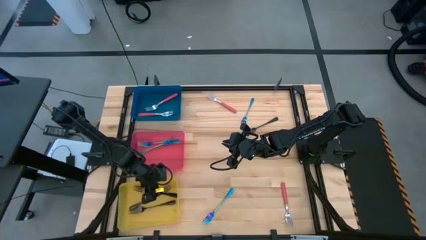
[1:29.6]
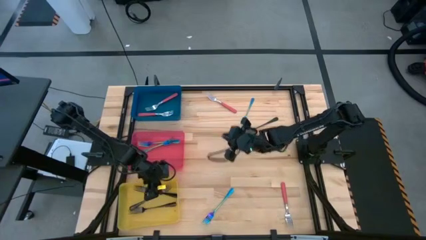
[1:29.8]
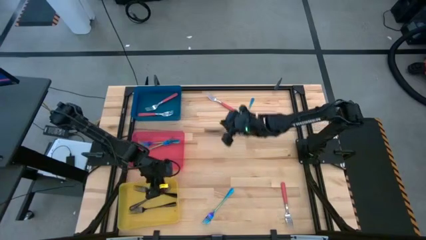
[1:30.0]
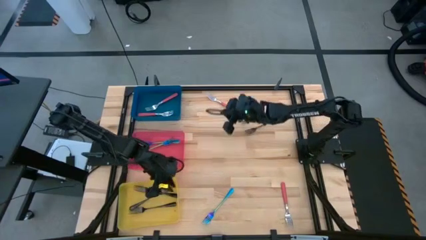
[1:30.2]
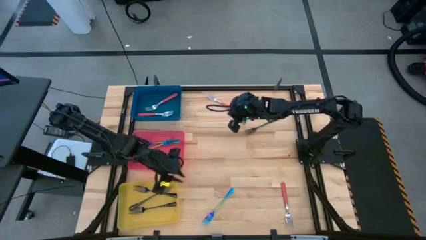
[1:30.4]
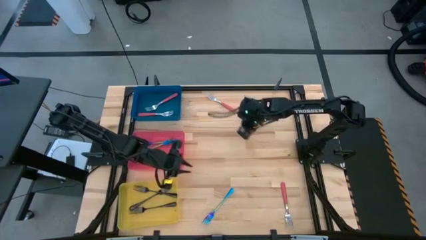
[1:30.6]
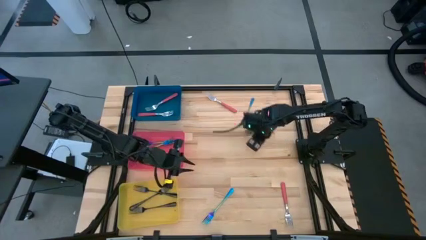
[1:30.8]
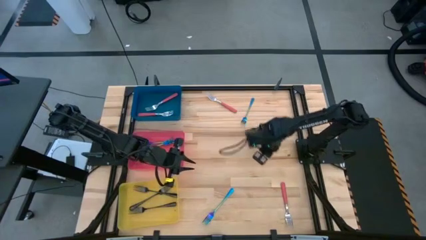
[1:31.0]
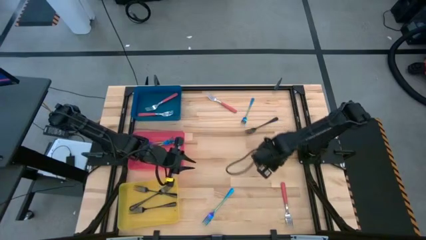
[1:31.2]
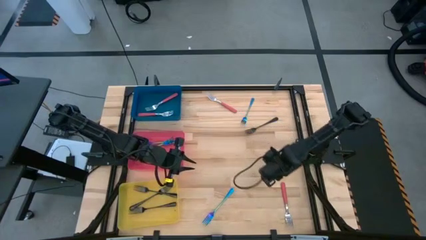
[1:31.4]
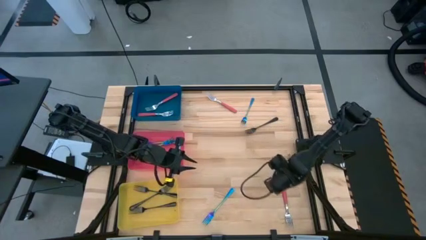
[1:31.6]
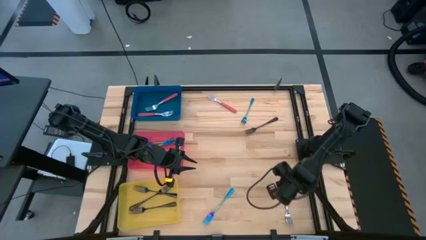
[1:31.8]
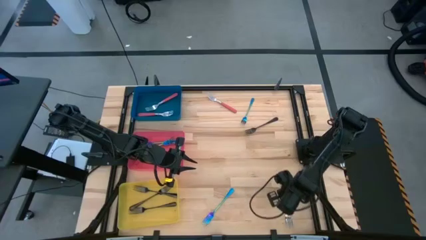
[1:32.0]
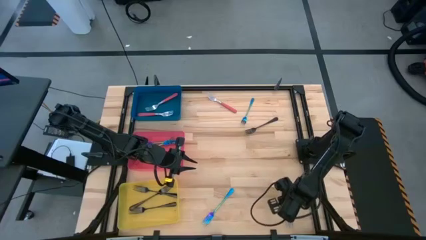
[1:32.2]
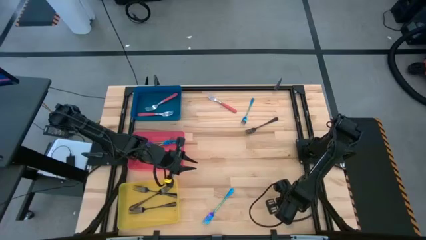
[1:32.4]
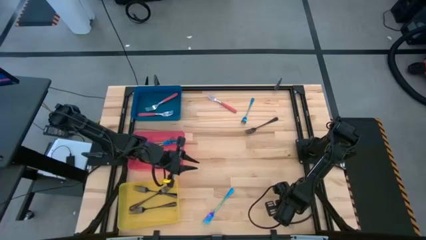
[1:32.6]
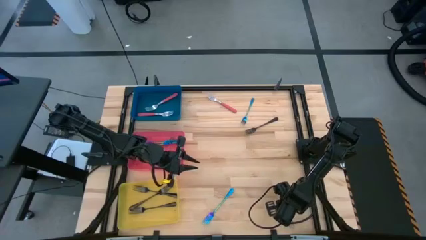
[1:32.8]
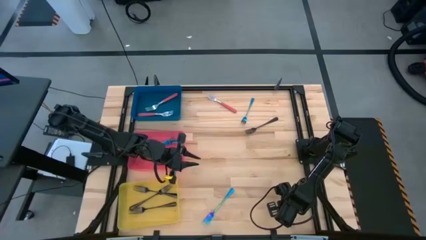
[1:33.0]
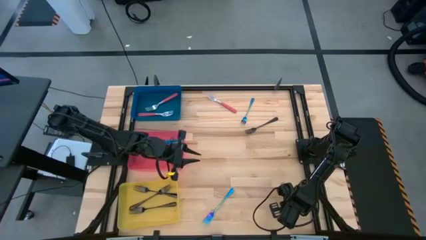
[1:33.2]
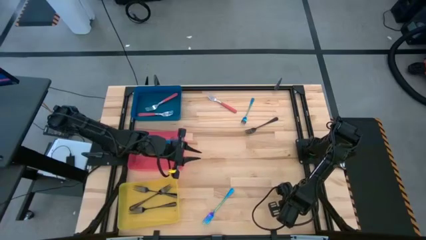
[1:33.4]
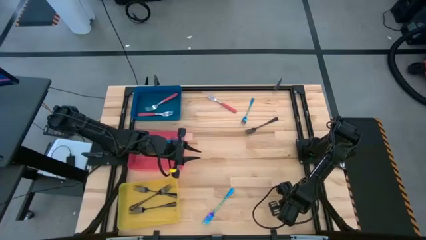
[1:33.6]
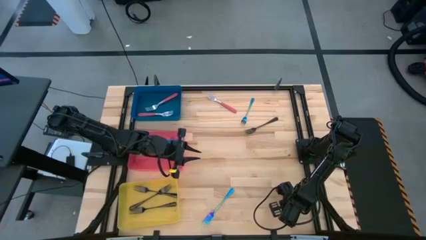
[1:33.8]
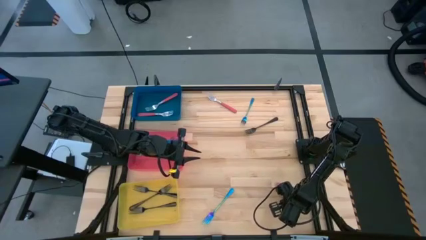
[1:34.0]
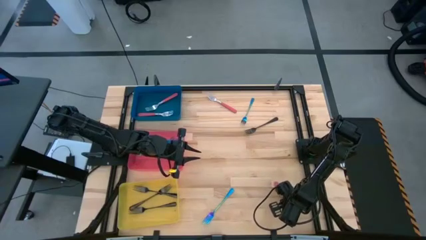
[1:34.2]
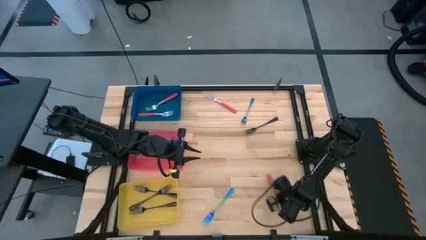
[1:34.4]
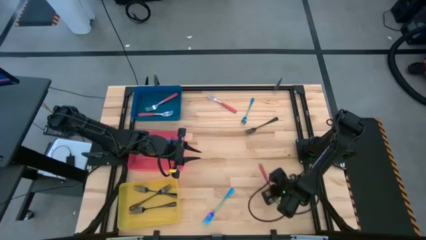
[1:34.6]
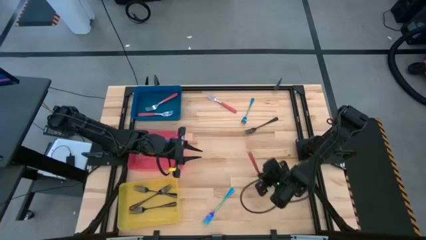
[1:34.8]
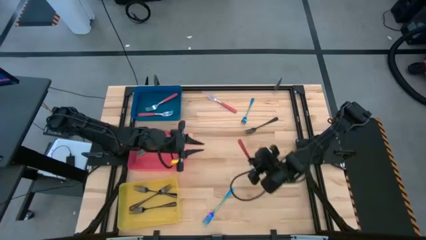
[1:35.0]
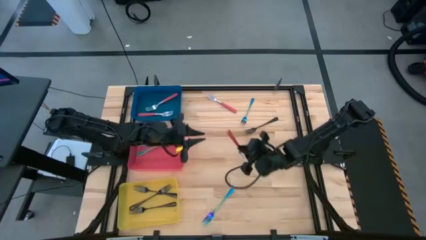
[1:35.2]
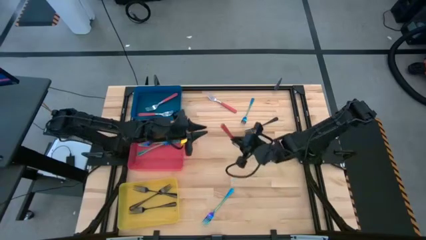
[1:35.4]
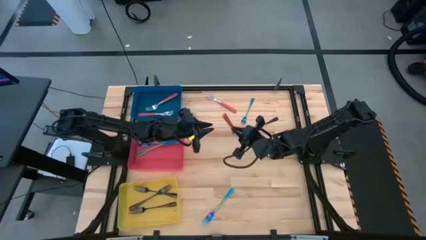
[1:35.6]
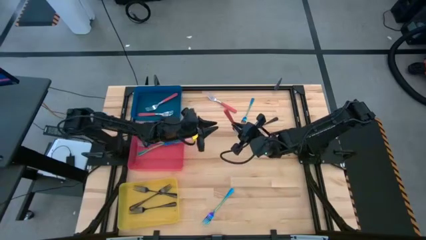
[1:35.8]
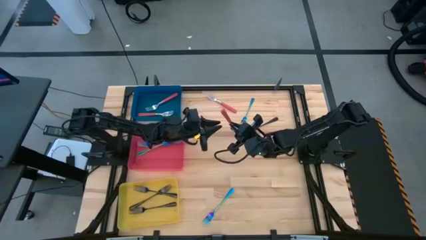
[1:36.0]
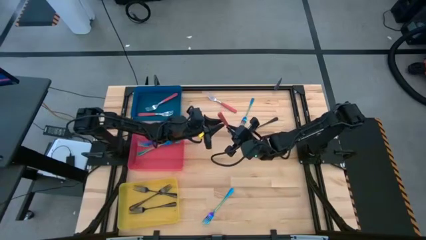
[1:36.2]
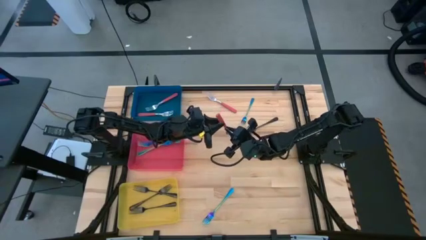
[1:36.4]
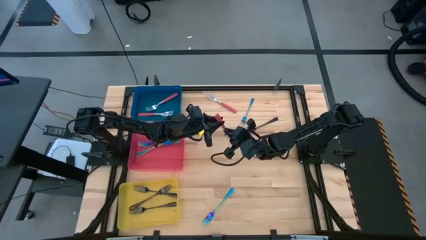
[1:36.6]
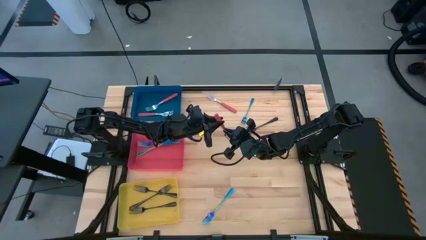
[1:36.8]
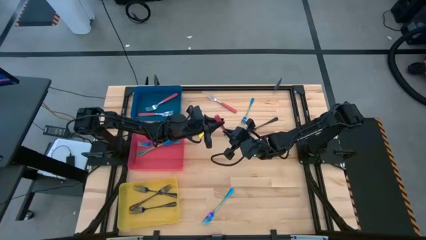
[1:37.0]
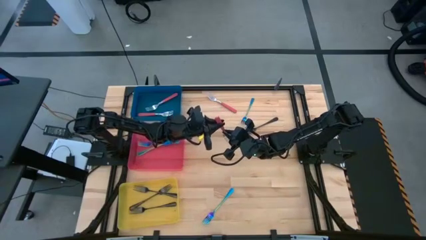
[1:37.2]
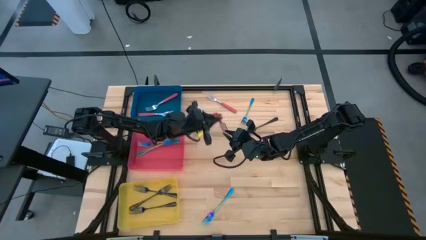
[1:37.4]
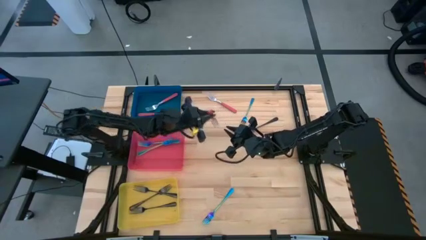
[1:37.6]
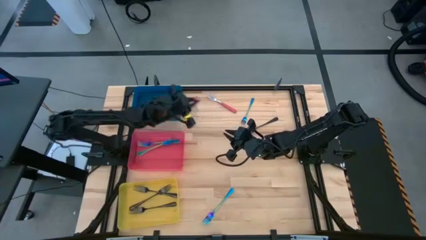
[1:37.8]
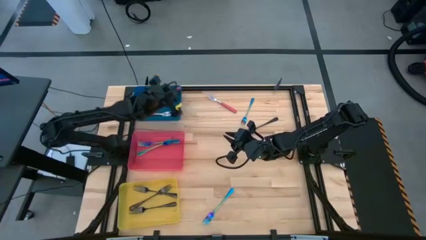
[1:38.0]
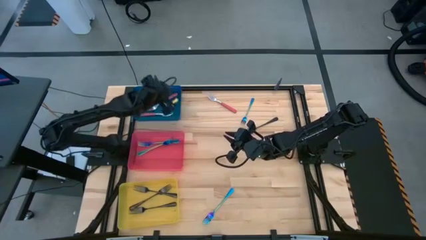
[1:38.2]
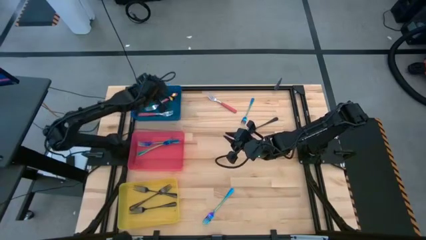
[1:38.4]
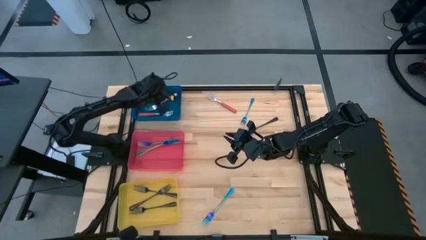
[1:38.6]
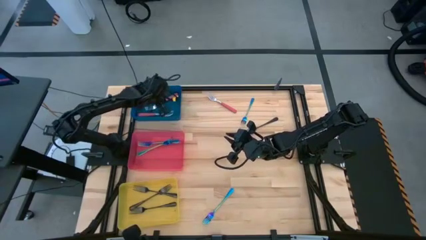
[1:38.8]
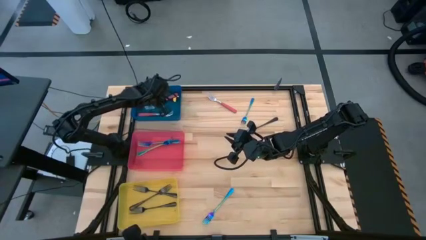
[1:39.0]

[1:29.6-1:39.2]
Task: Sort silverware by color (type)
Put the pink fork into the blue bin

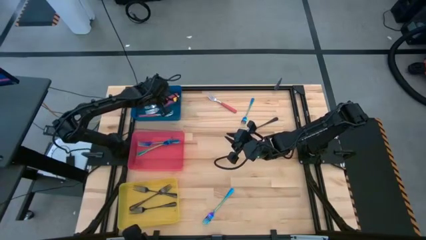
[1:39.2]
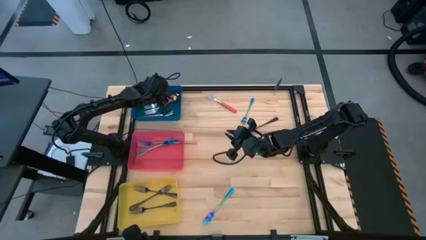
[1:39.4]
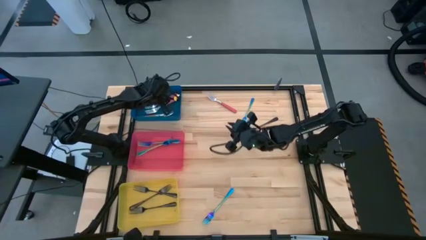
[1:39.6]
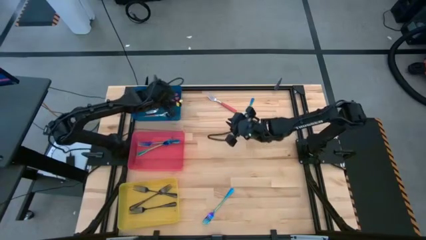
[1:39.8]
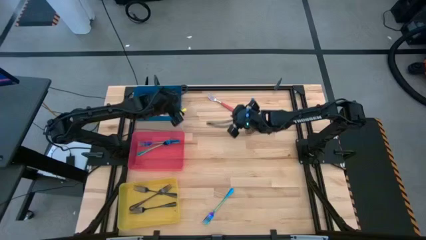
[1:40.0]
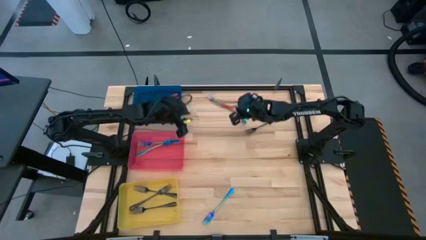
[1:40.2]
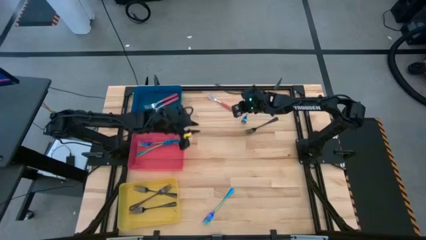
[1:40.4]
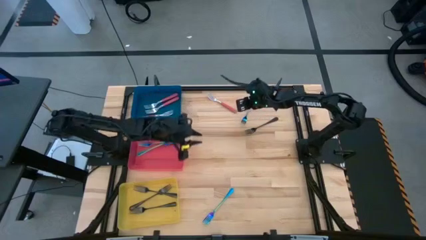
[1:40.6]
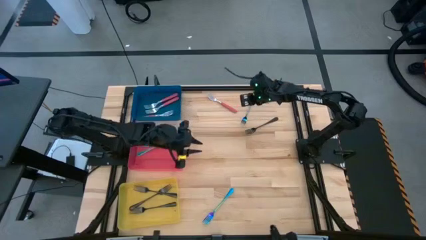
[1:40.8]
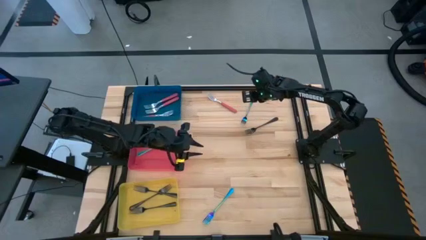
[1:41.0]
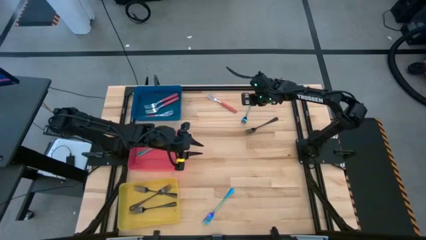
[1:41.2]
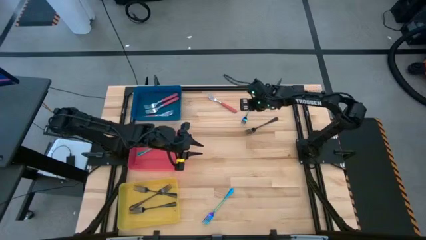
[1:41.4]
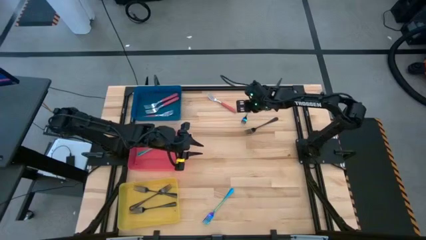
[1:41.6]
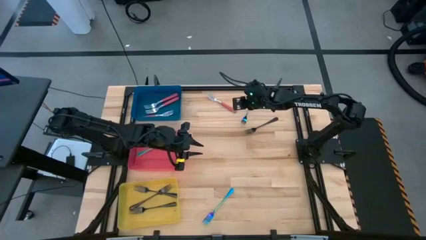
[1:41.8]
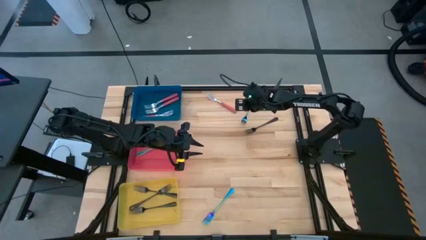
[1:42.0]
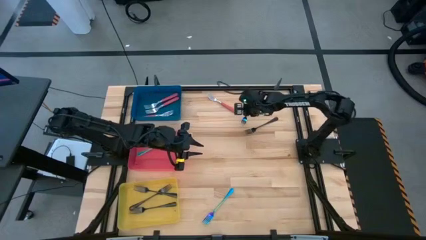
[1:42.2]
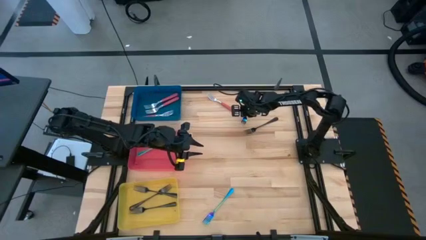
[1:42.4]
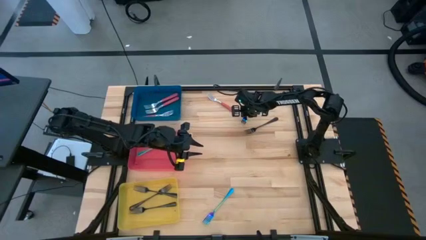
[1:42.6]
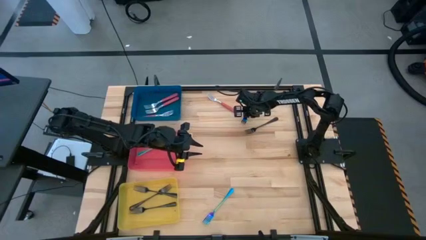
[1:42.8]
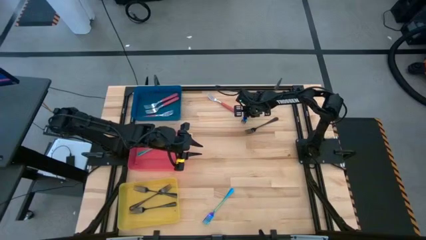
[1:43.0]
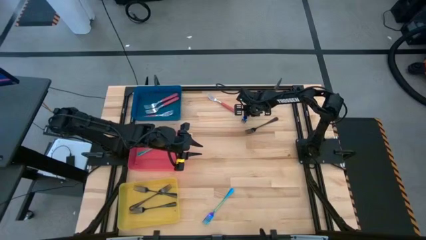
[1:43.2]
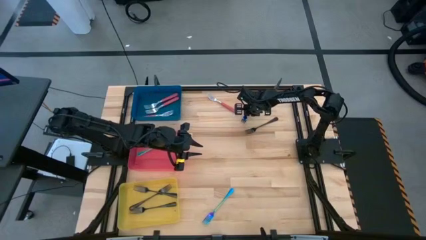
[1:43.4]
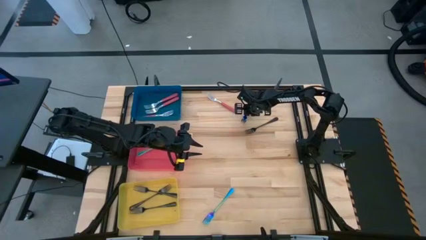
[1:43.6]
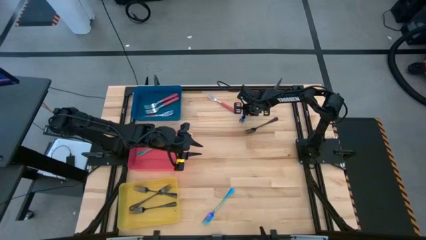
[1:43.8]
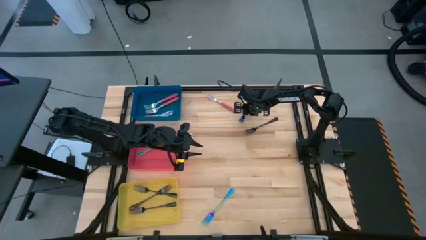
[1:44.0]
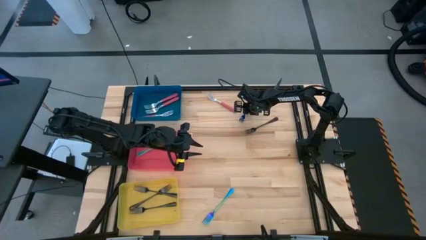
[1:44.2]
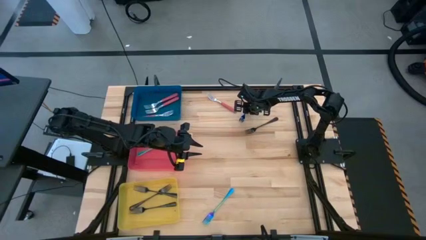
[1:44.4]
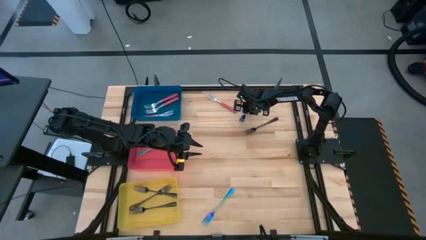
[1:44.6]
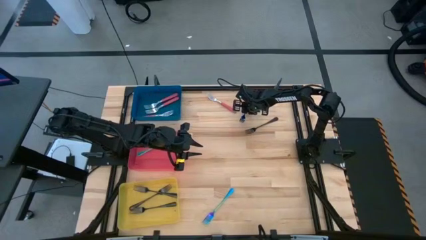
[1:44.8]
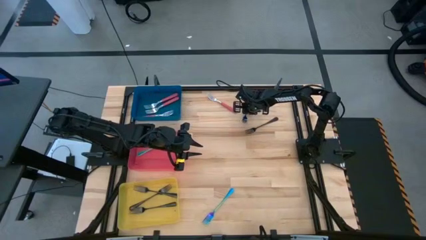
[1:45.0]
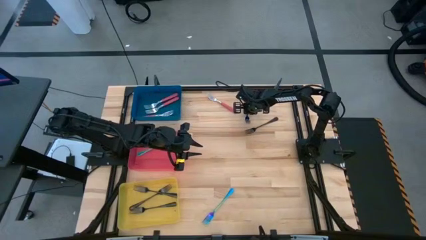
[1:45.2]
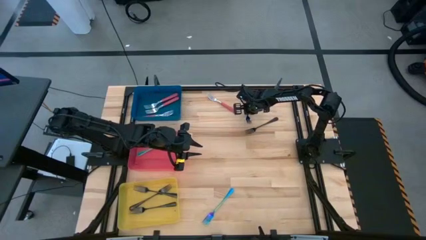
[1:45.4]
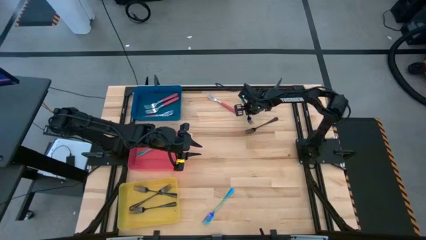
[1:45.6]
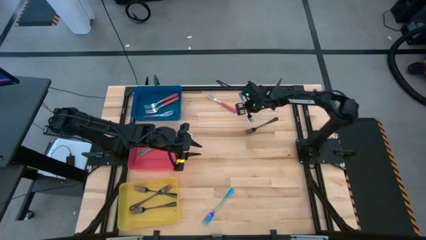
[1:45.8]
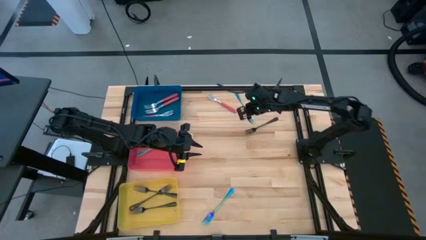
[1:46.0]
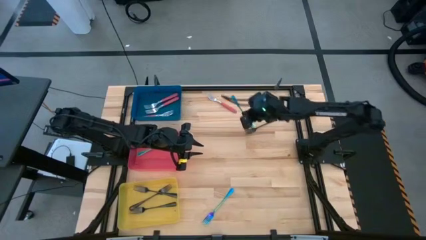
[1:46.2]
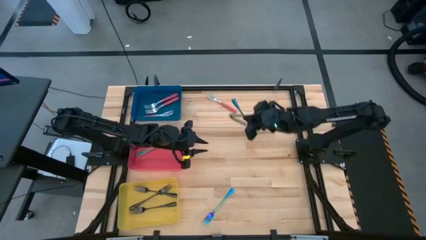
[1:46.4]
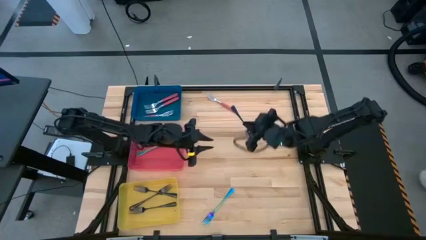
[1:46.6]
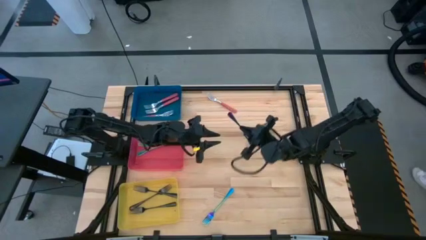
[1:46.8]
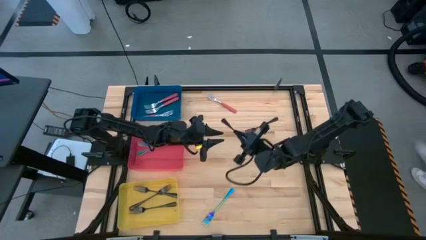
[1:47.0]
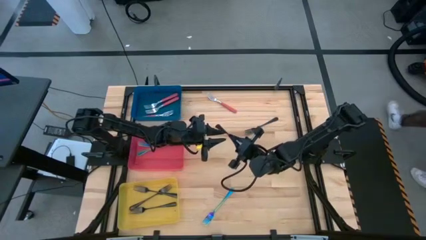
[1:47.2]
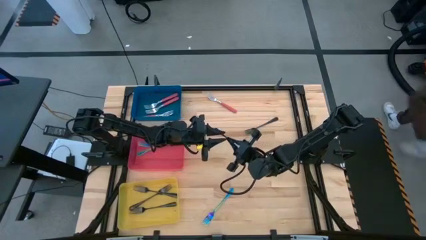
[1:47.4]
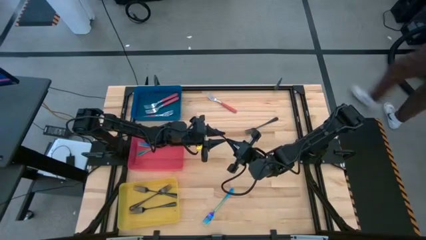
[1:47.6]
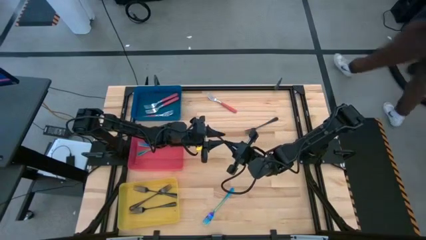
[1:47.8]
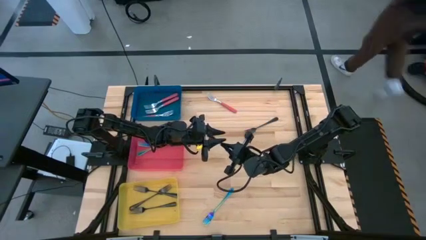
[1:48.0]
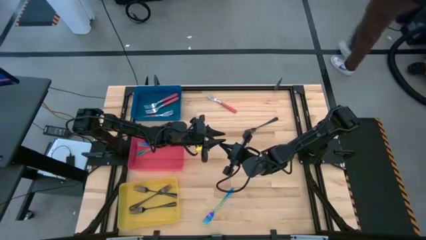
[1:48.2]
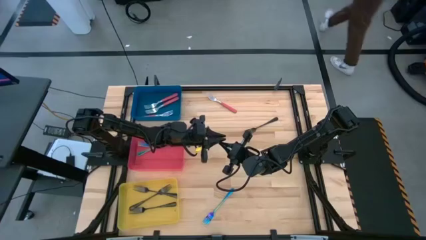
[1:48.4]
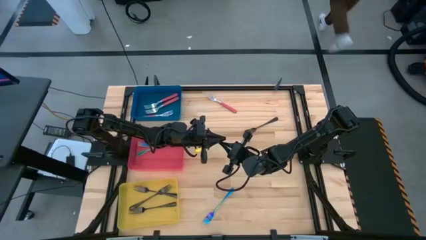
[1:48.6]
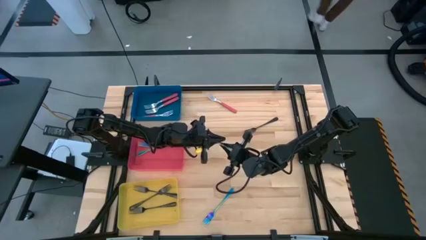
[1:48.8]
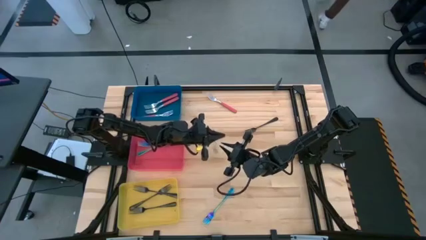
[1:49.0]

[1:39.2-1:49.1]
Put the blue fork into the pink bin
